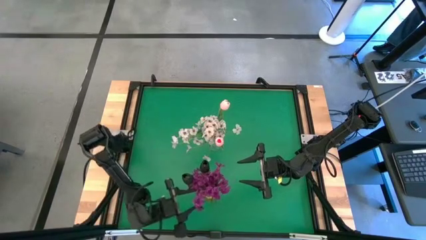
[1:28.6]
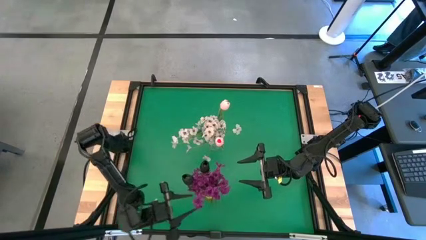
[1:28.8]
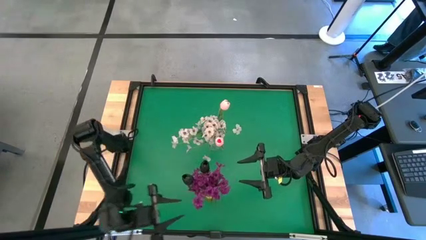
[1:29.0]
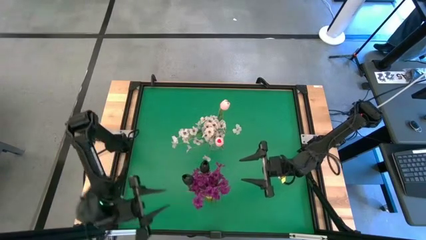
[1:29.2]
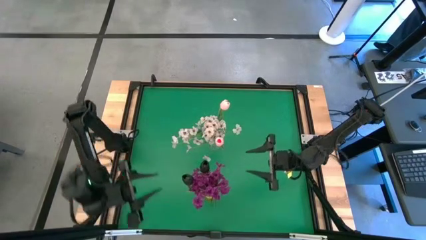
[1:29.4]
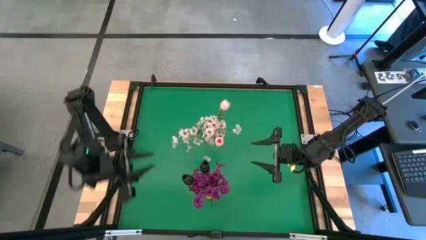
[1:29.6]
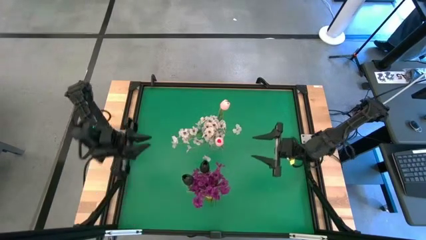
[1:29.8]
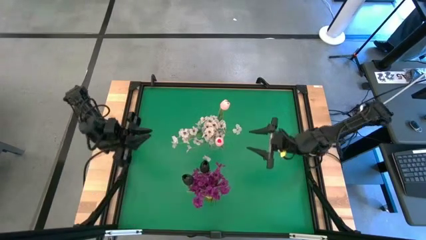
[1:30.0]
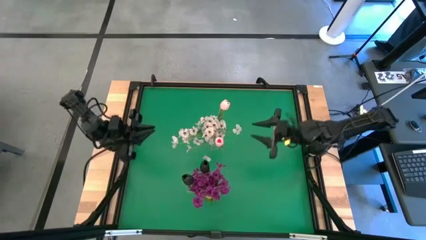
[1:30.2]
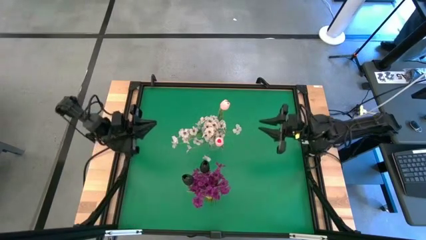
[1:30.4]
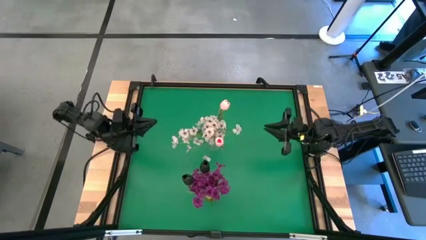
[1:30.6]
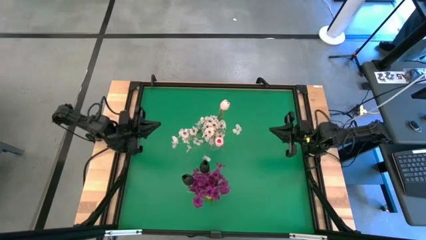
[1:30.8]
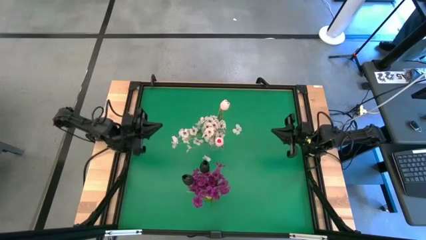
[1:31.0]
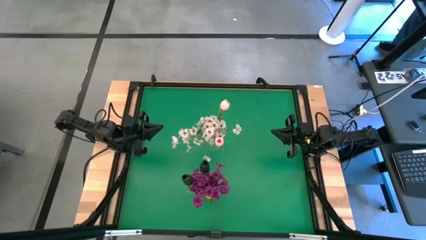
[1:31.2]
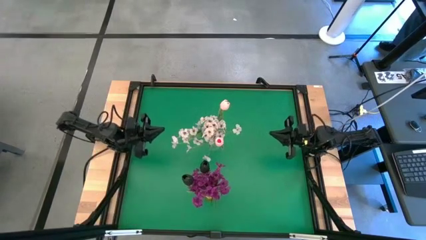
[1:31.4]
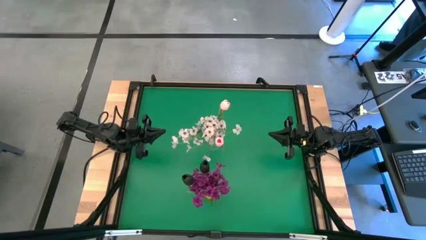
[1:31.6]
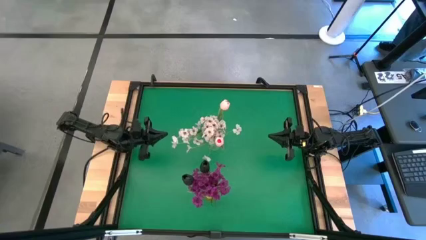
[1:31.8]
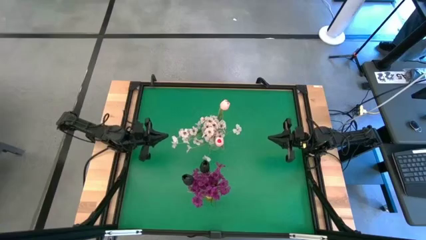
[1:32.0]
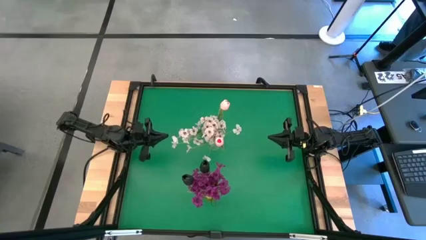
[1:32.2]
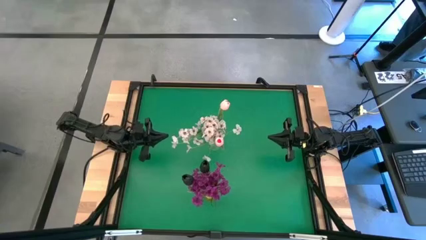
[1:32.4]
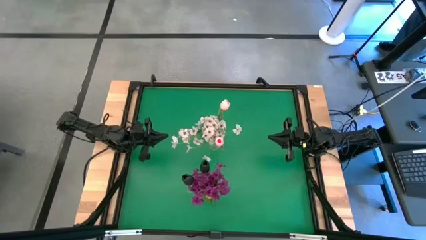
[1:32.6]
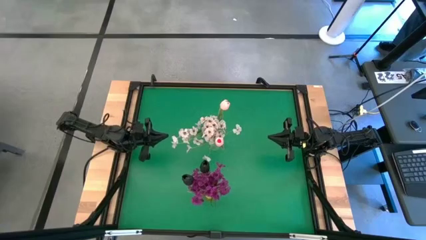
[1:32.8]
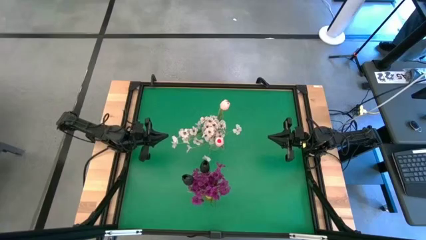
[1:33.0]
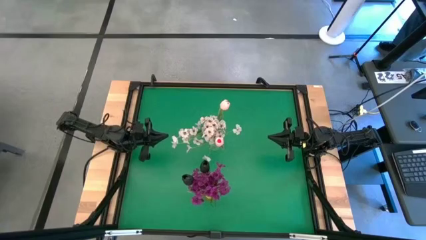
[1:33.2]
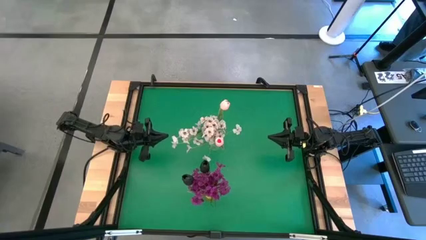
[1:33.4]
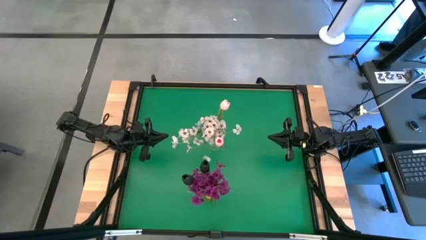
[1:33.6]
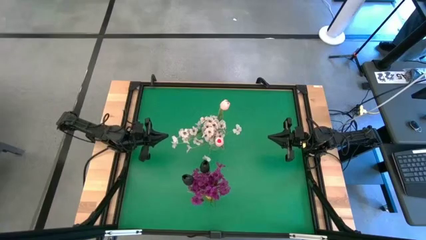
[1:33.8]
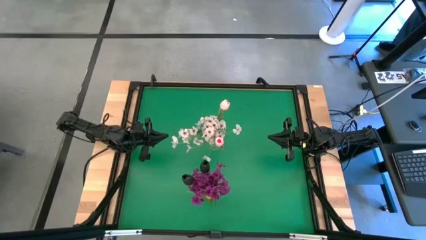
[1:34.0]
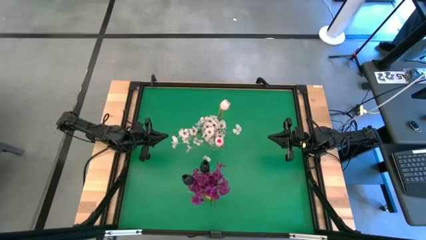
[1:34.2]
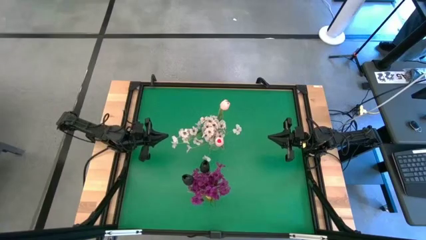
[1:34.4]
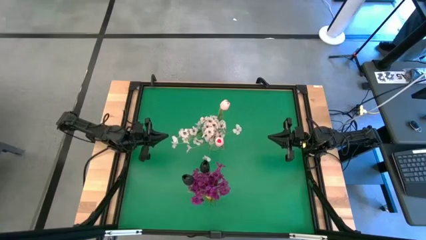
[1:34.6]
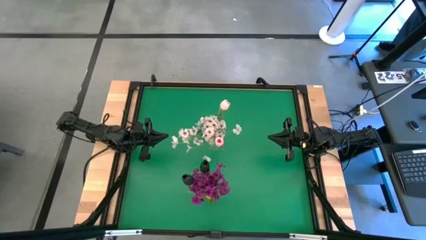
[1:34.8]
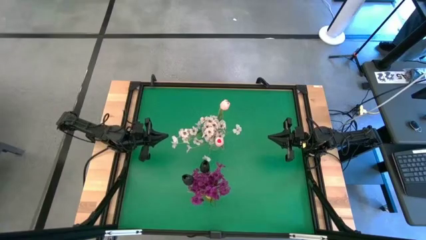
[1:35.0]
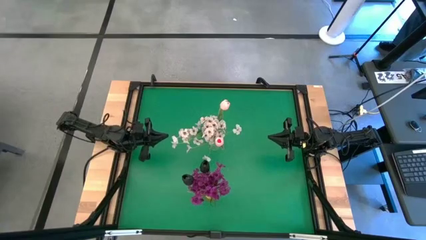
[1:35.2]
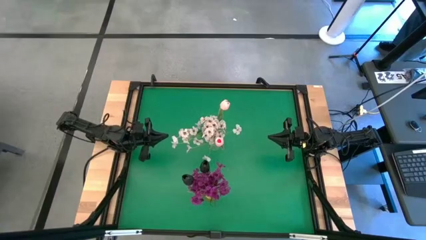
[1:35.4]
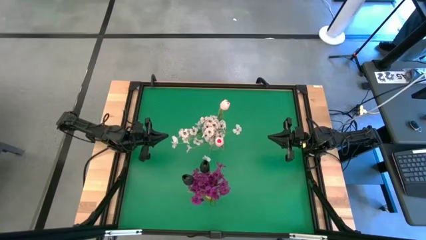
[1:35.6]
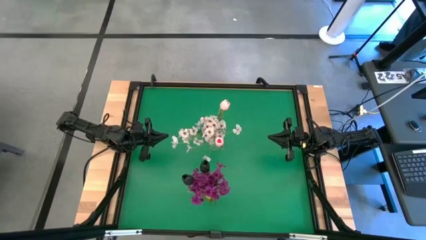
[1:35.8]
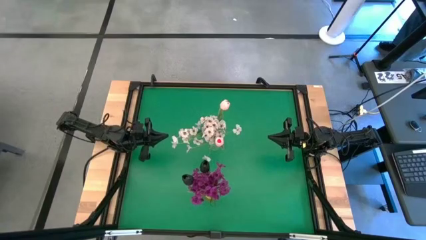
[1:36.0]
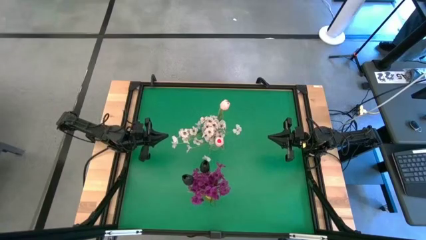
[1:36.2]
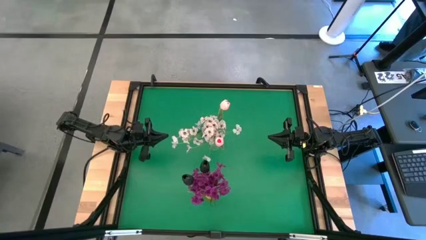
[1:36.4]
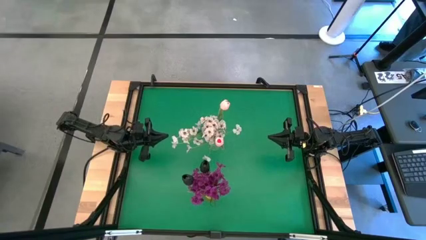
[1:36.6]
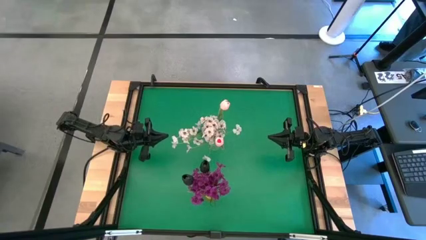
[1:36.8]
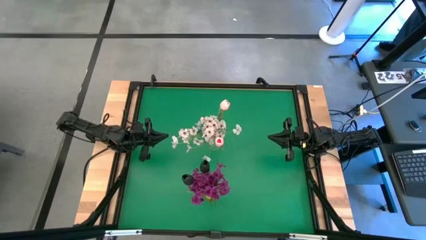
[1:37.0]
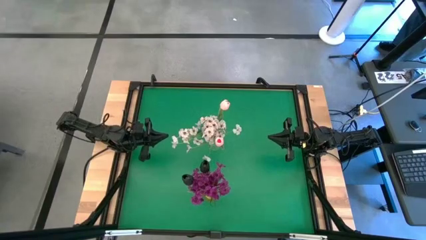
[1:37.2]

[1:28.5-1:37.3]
Task: Sort flowers into vase by color
Return to Home Position

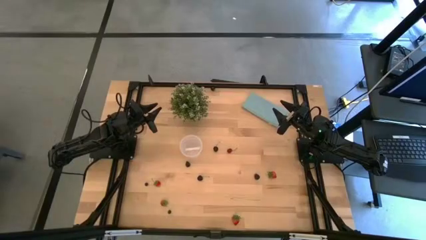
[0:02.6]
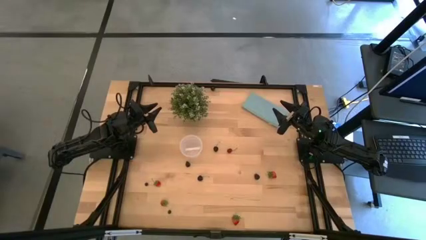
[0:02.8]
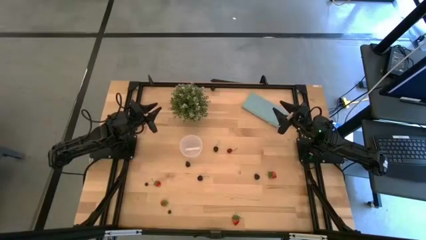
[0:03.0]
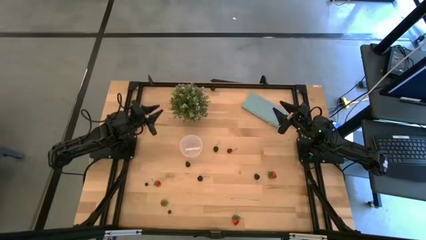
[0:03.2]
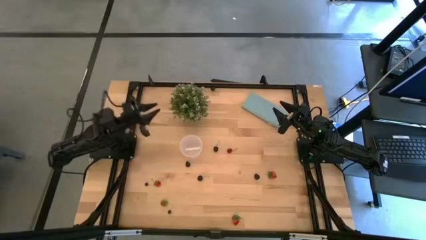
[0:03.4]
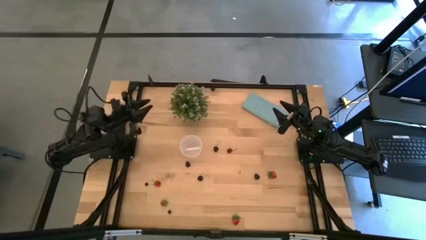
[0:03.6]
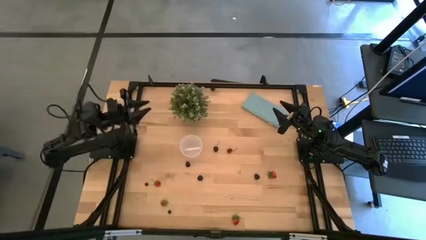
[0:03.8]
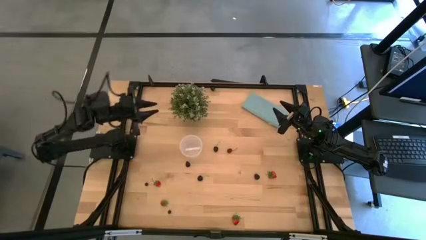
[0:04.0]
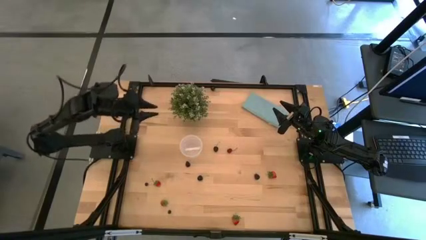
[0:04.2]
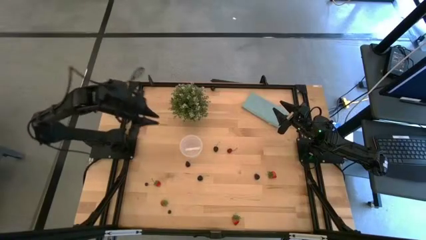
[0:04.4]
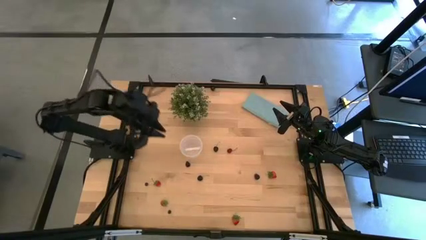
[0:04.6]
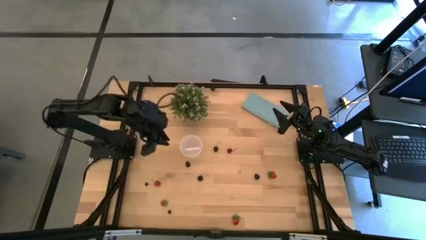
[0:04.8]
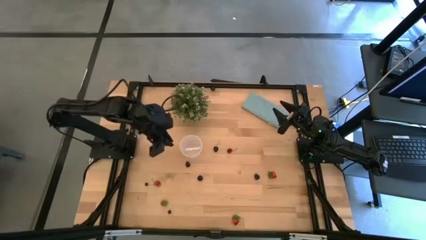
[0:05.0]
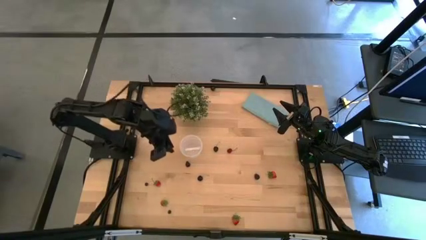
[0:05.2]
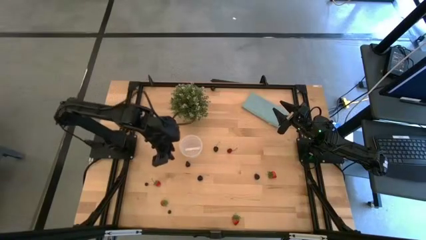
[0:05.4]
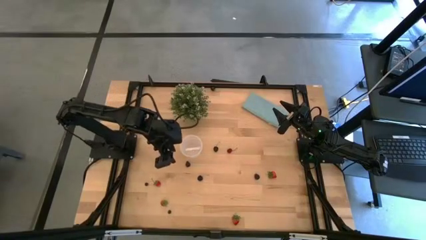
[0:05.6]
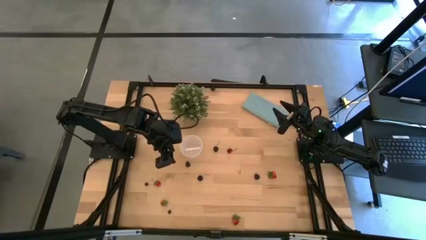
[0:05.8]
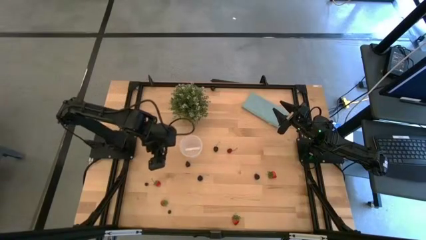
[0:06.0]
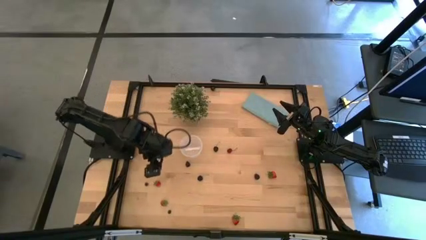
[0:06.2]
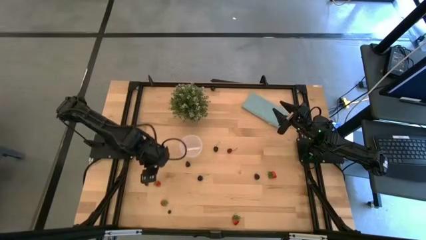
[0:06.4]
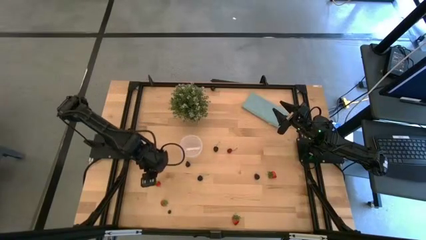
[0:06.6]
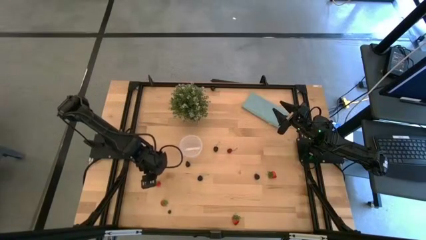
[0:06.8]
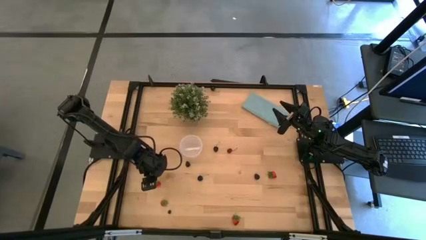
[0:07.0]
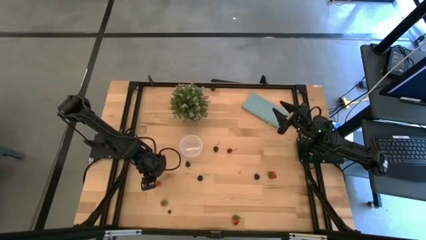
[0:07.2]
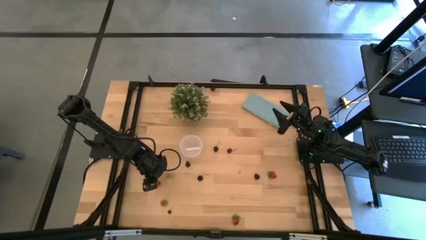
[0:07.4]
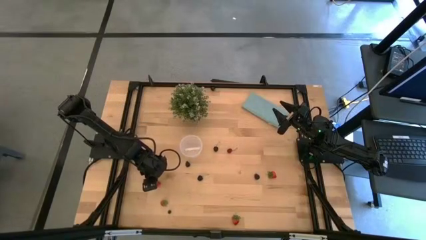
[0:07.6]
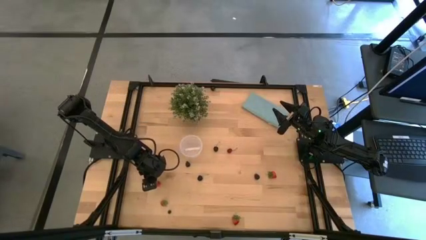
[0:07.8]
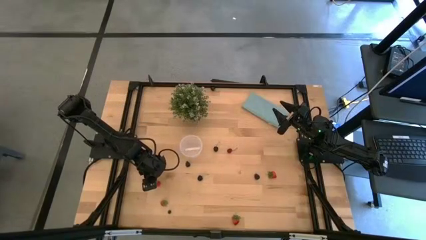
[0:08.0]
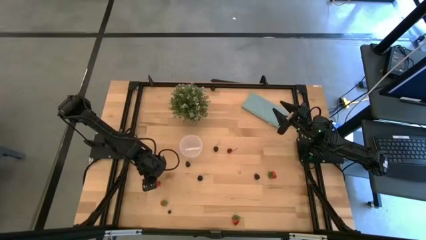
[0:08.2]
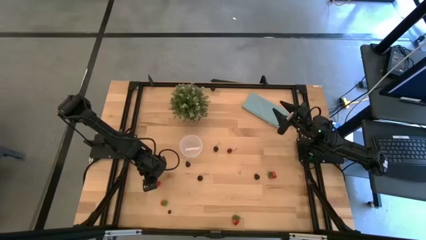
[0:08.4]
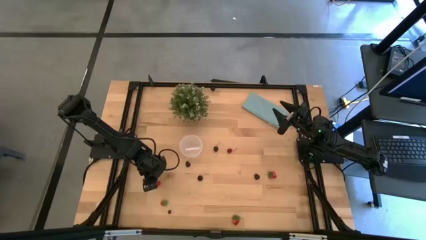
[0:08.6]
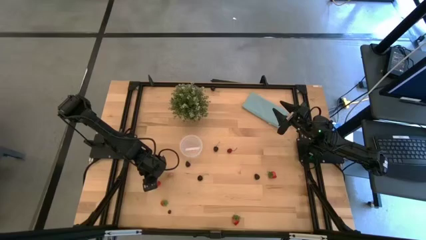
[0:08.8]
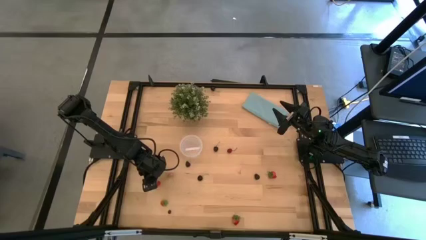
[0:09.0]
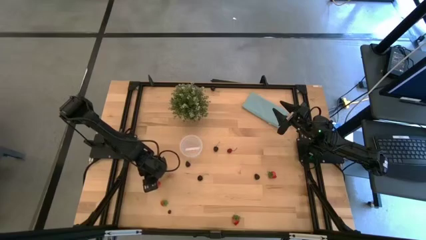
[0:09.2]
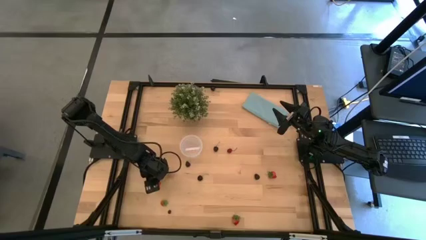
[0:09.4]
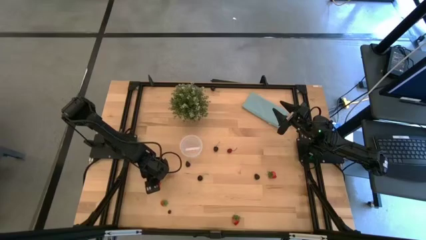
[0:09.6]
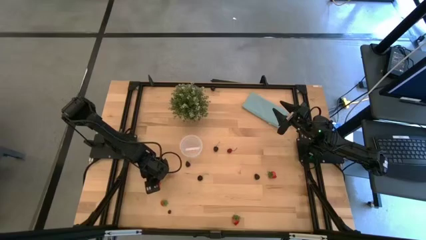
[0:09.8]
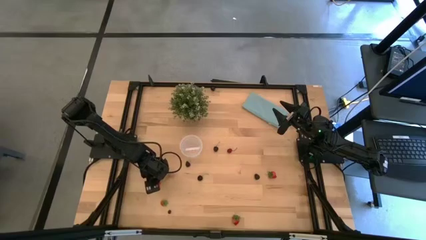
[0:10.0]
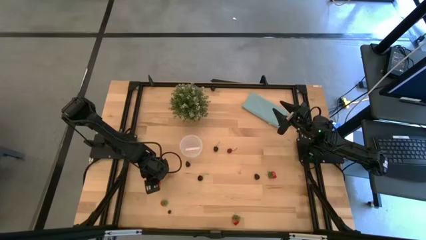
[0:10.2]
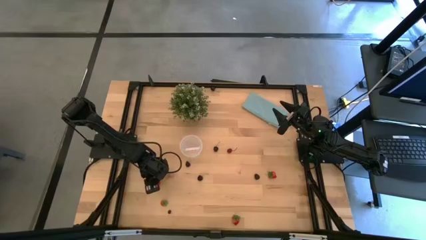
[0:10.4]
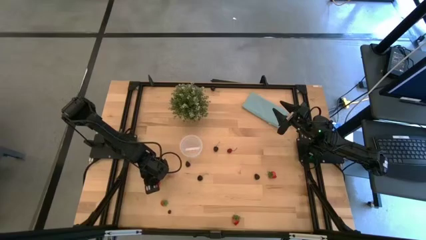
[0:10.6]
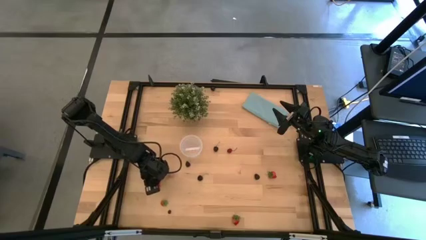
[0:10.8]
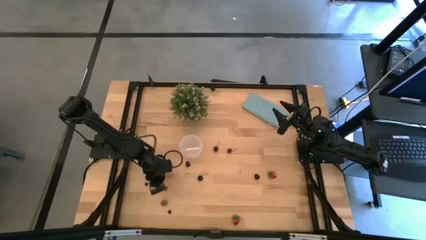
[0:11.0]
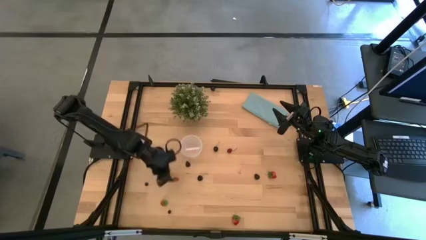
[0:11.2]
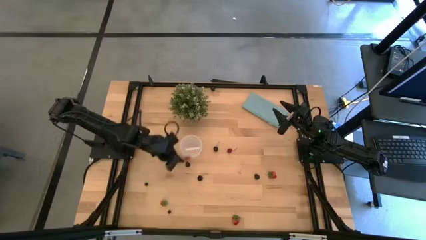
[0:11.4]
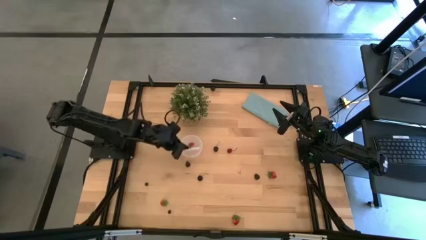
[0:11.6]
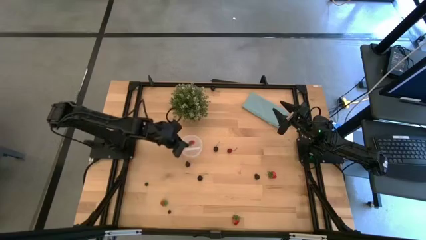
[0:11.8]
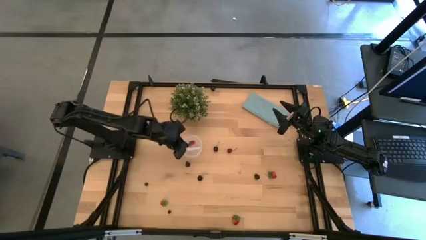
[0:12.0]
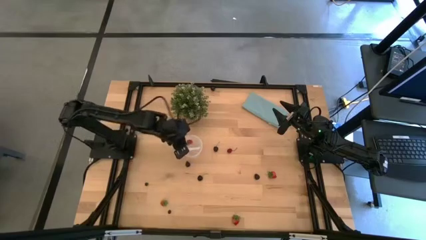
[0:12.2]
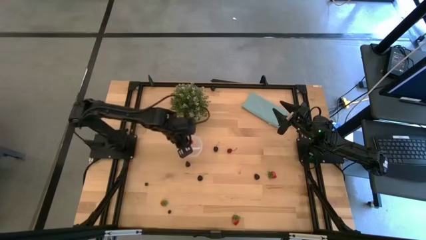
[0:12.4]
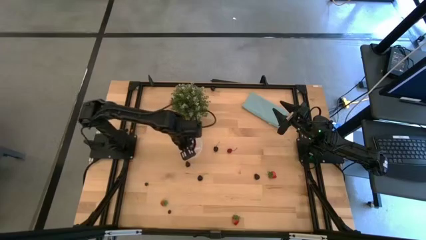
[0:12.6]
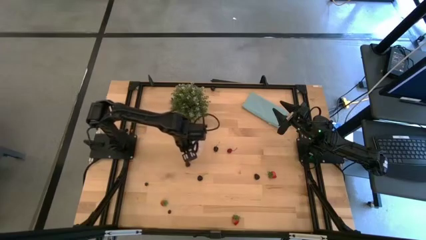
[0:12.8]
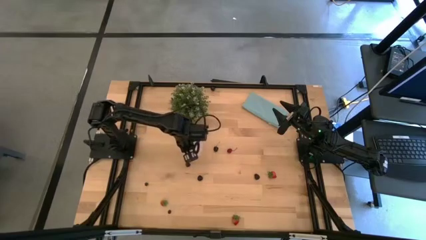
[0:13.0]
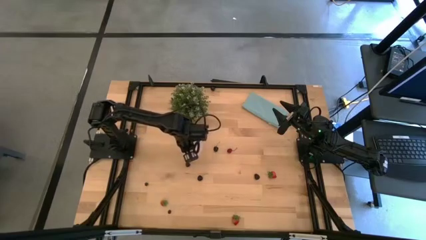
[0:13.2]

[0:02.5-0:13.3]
Task: Pick and placing Produce into tupperware
Put the red strawberry into the transparent container
